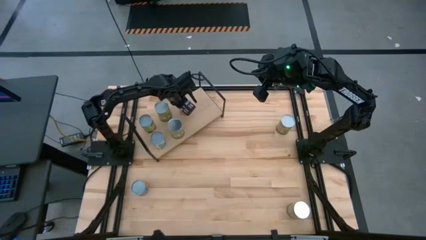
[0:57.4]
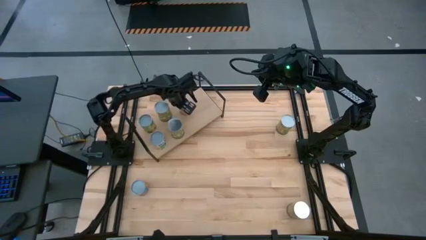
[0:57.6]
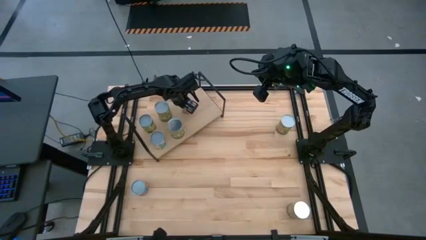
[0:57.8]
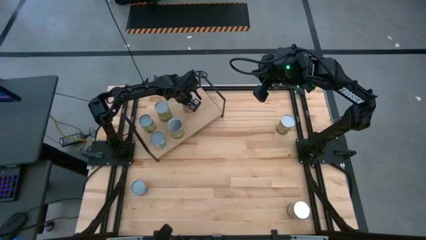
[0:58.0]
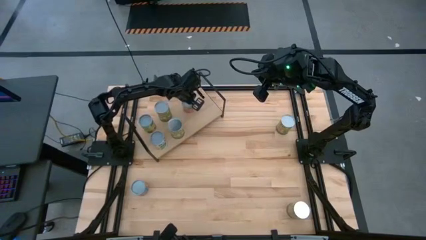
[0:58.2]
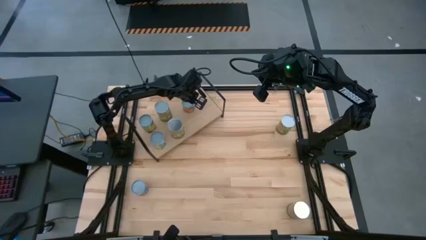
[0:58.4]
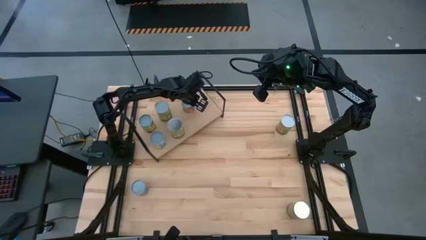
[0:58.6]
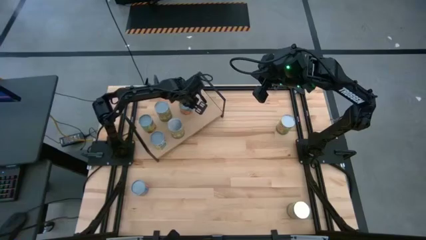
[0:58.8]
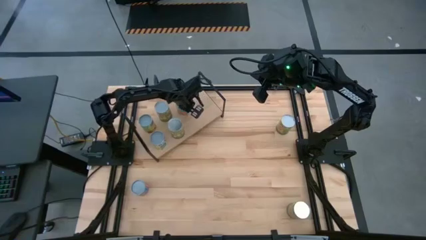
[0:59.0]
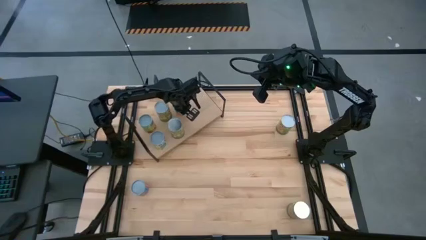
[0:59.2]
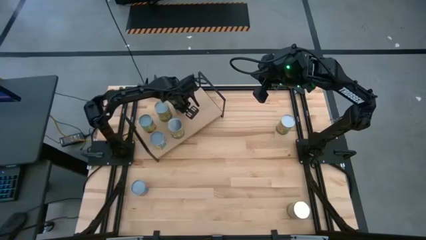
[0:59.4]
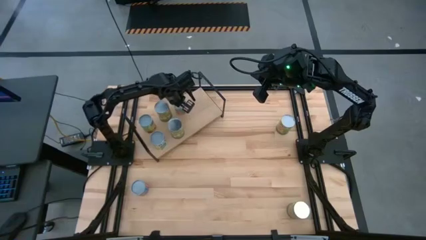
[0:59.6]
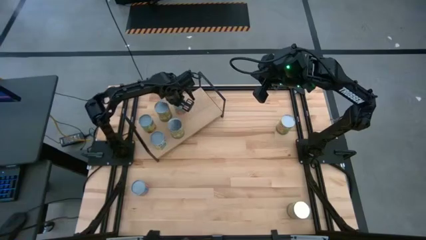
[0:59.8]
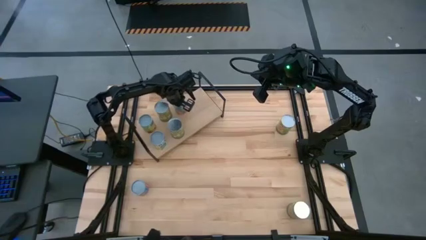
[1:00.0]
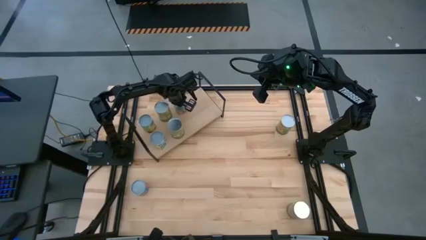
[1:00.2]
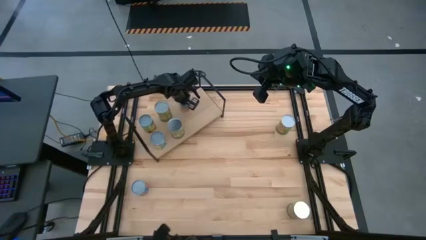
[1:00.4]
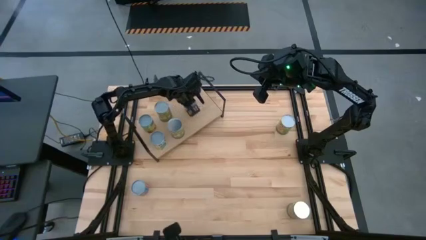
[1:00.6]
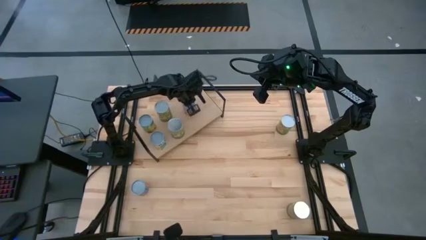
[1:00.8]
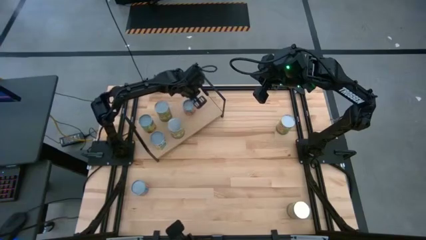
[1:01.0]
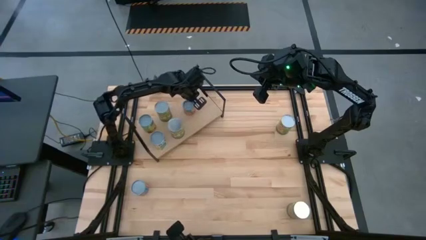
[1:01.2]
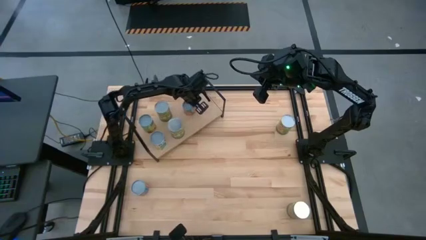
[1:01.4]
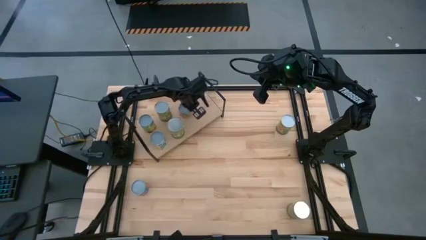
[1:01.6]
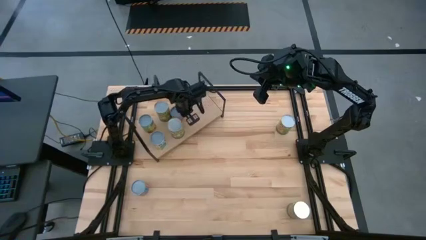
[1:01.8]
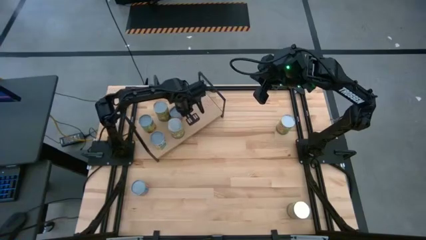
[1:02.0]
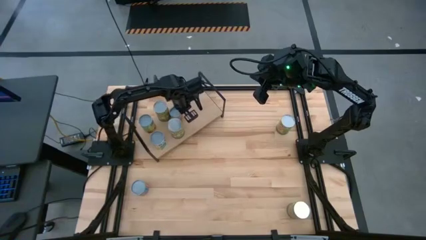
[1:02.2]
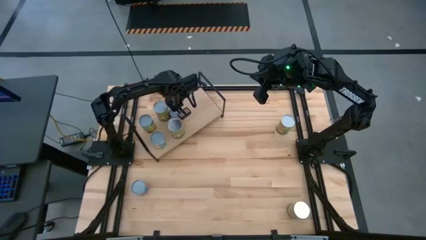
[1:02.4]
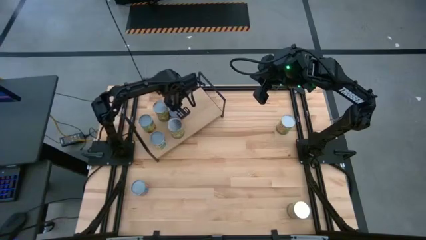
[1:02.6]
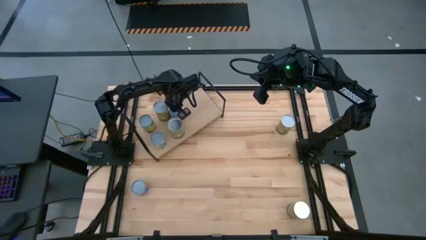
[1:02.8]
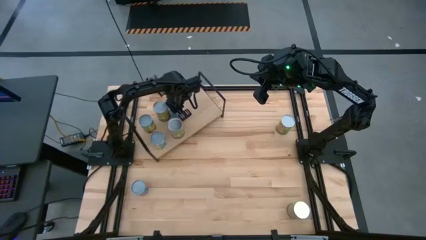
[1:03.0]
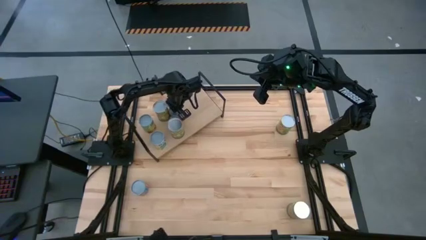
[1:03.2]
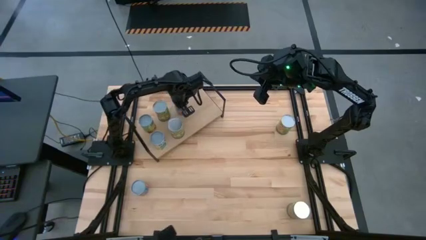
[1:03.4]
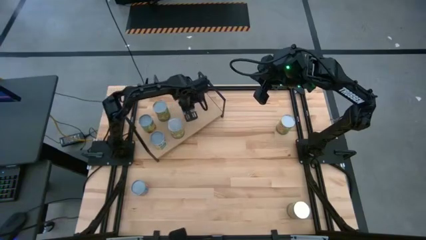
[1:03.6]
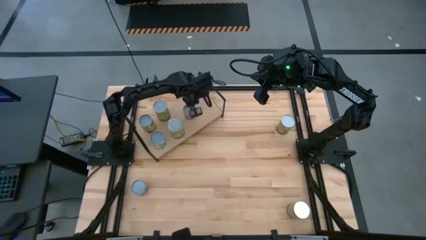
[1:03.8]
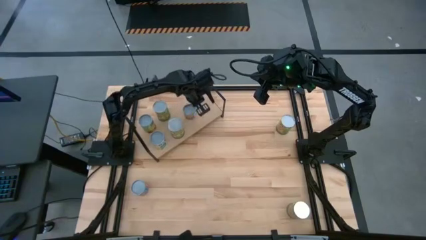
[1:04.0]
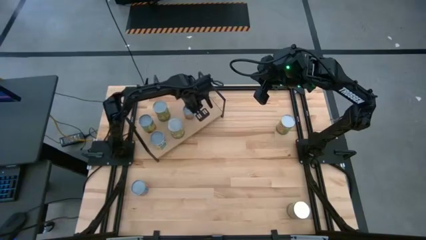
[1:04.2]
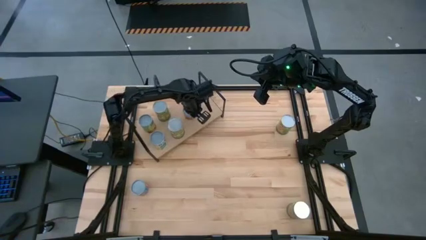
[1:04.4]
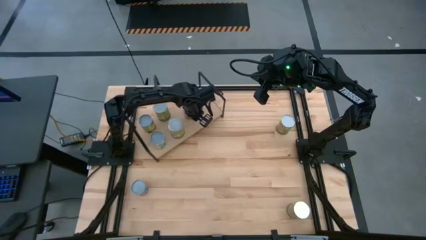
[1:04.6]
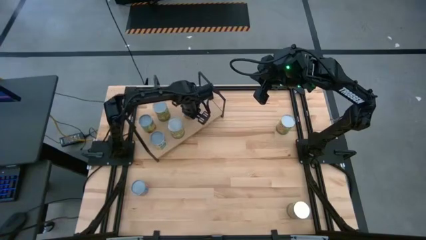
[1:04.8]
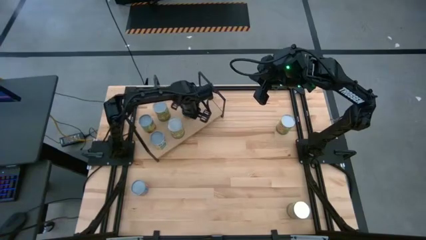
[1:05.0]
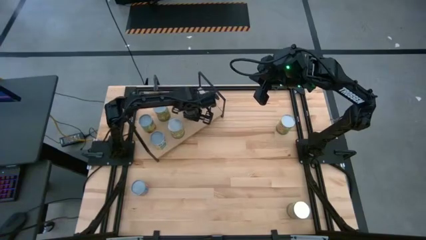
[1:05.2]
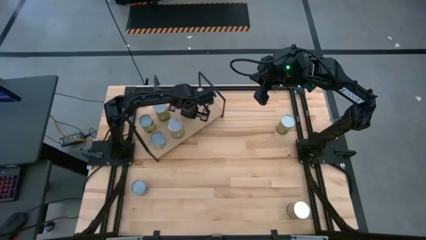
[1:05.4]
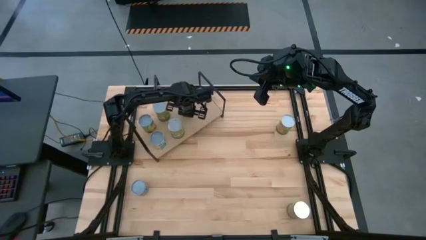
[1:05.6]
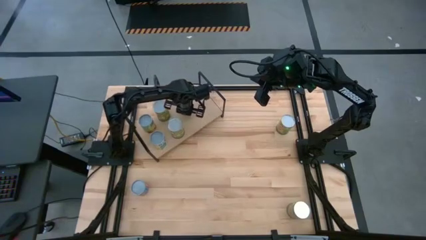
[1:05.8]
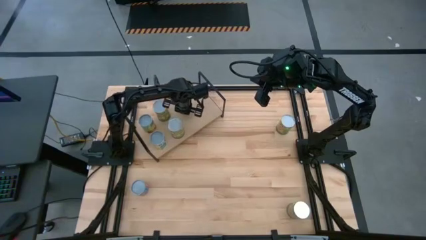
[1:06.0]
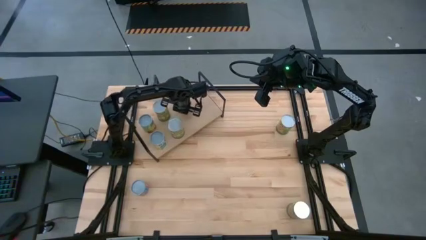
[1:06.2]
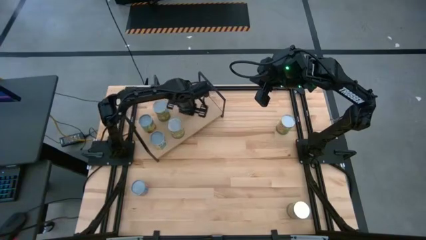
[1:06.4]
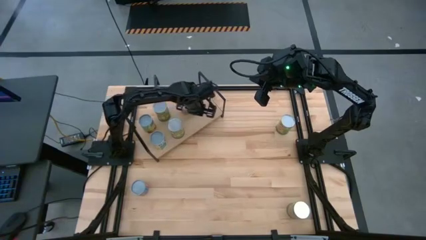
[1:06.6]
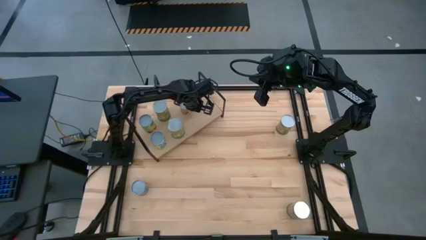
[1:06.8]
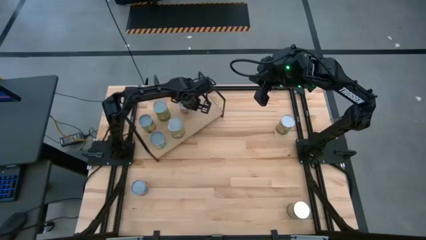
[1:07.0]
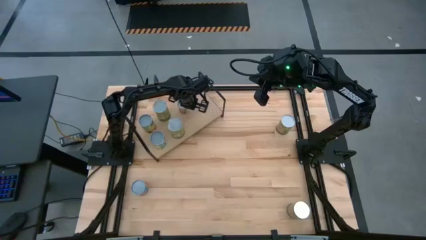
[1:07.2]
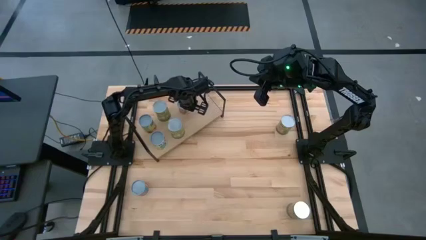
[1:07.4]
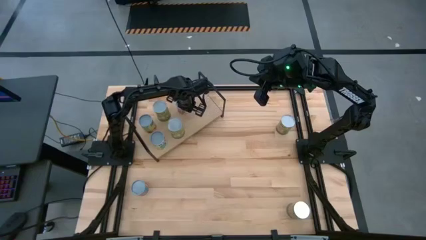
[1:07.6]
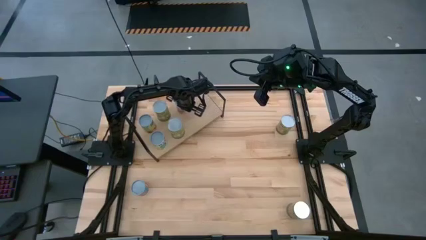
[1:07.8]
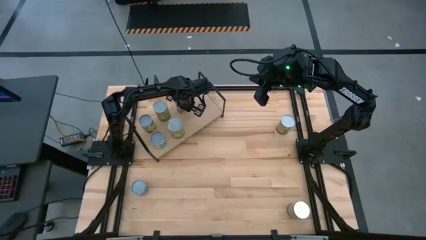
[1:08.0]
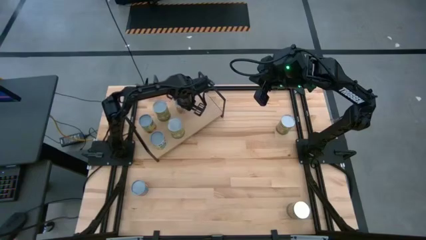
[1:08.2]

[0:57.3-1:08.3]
Task: Pick and place cans onto a shelf
Put the small canned oranges on the shelf

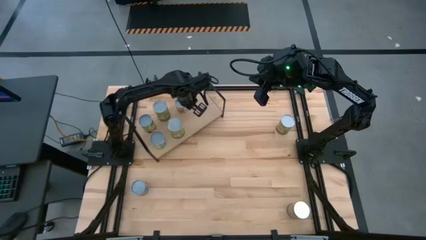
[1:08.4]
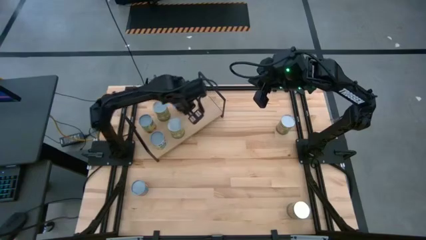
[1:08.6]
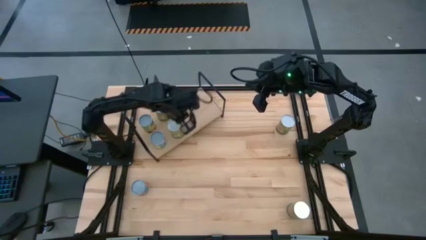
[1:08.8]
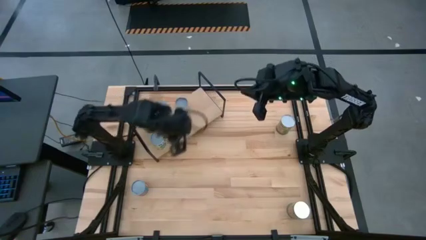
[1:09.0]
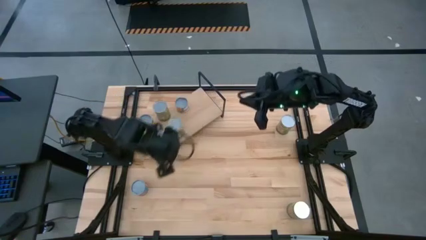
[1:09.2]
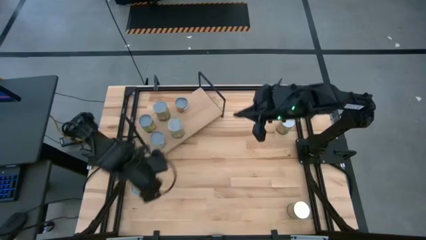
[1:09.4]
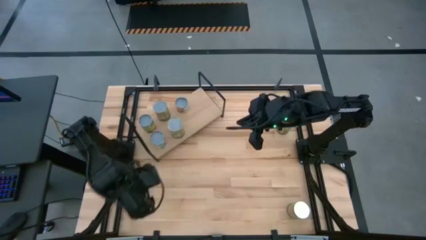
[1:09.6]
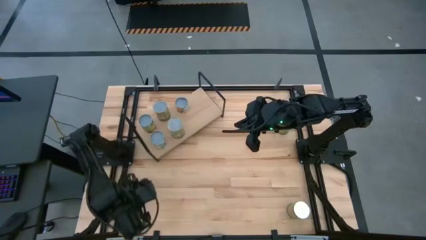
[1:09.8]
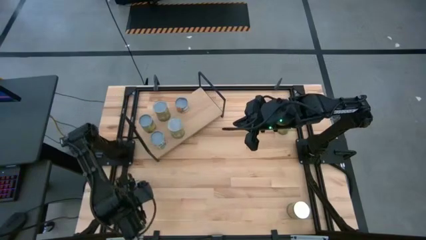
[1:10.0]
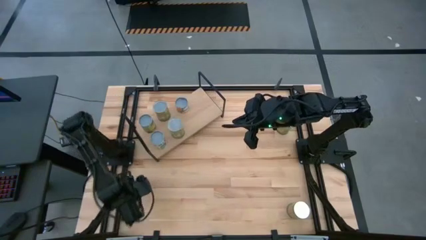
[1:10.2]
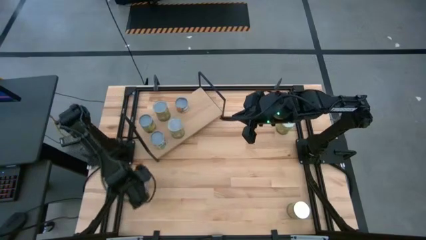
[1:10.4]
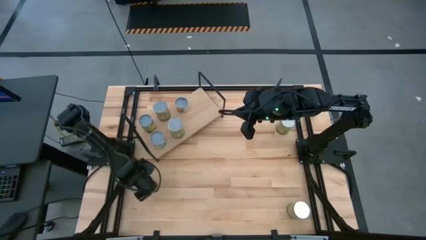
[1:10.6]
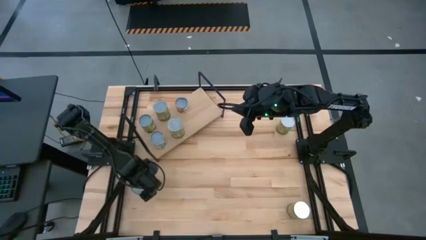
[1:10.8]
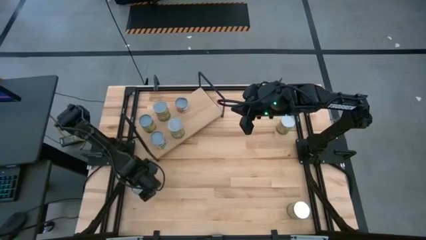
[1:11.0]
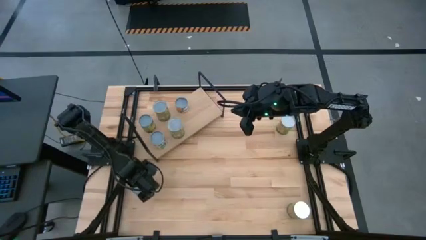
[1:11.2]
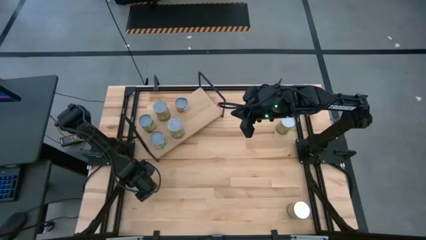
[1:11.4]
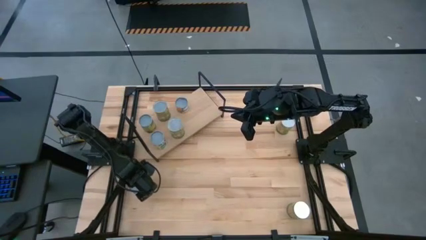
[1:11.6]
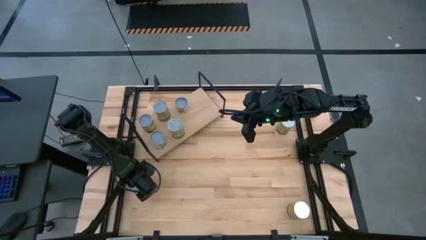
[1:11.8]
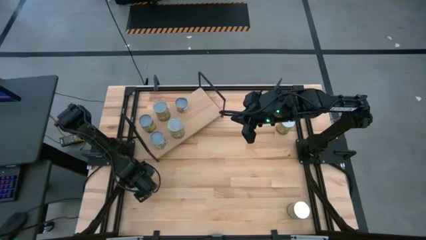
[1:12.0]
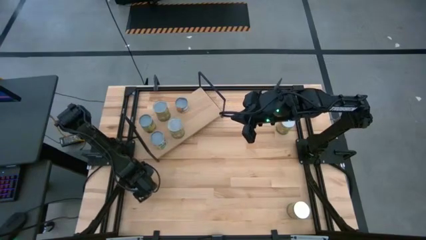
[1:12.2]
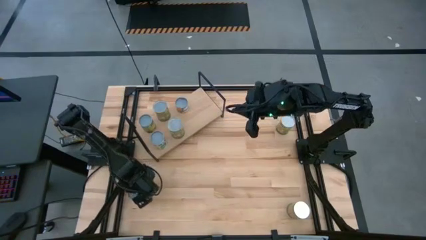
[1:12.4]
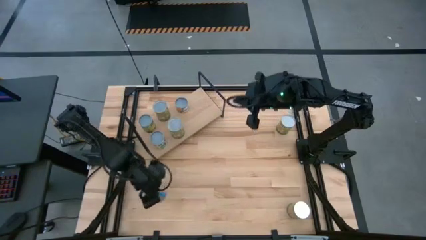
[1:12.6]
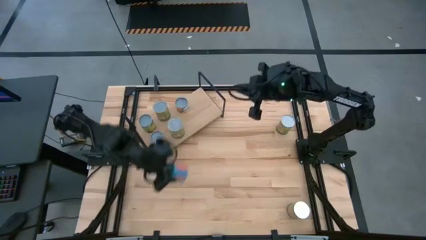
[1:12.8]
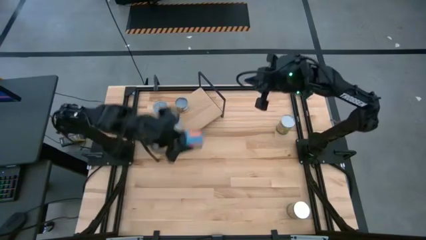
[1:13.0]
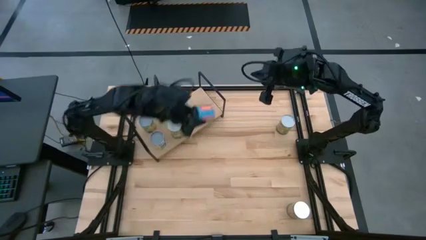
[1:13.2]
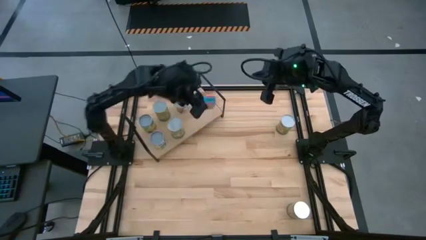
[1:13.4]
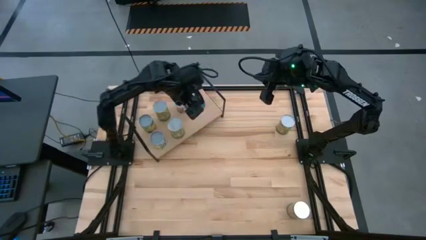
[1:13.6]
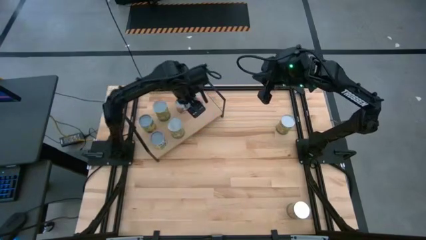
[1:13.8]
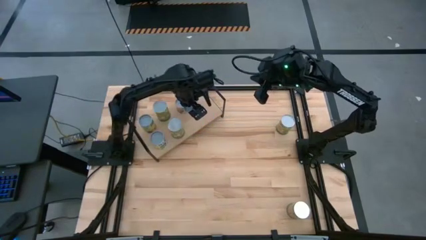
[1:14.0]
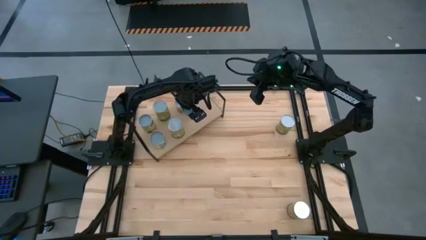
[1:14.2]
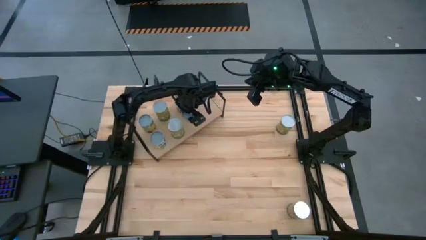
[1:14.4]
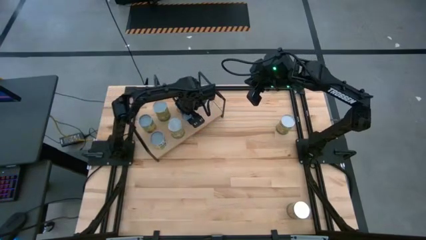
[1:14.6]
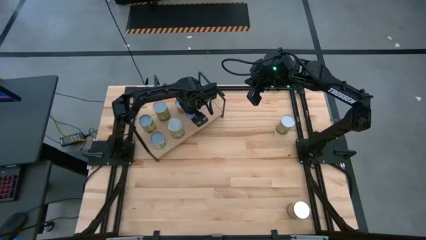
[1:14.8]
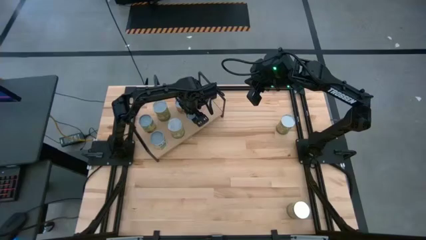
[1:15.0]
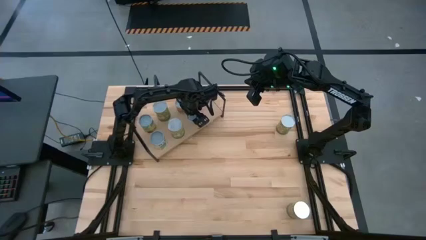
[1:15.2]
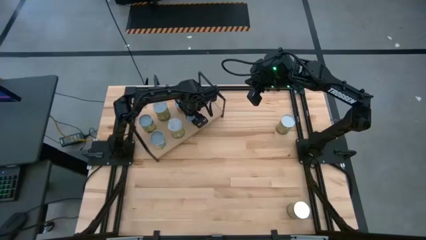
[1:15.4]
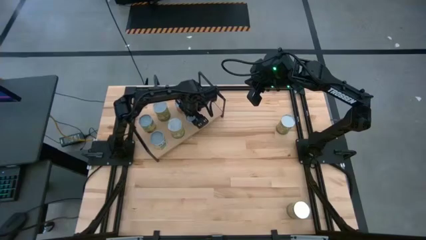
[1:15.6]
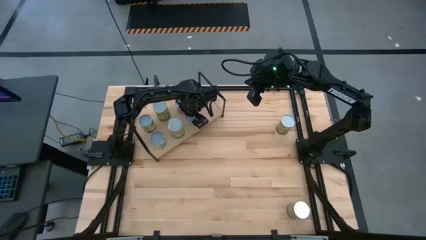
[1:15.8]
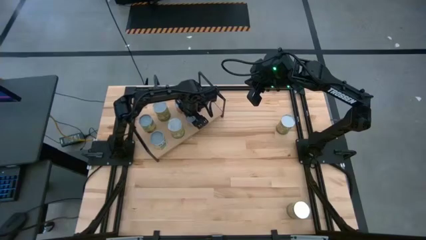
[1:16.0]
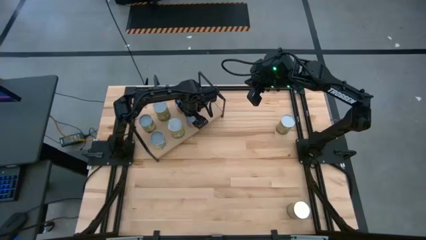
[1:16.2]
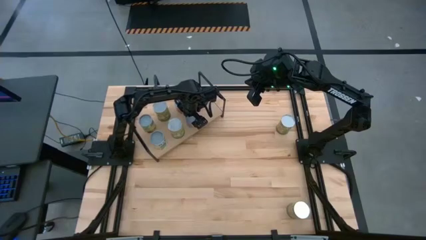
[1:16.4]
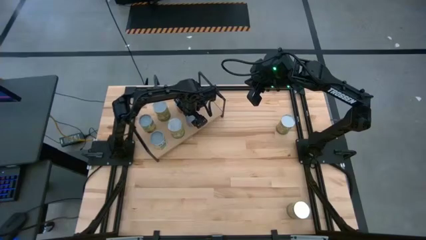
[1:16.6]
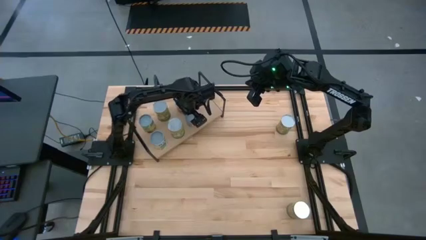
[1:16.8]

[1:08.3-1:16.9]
Put the canned corn on the shelf
